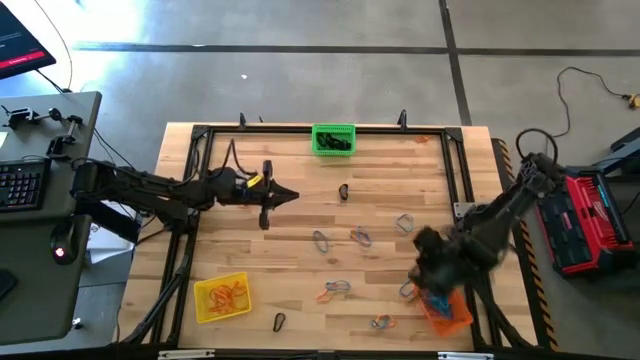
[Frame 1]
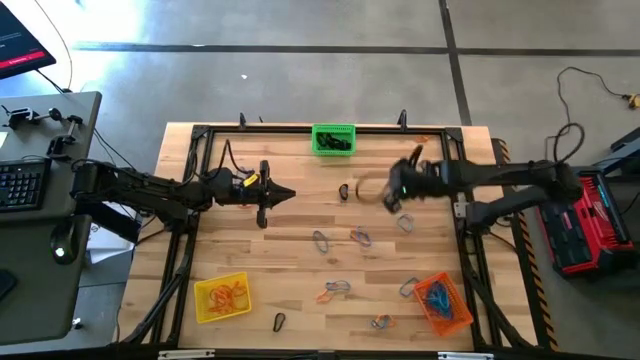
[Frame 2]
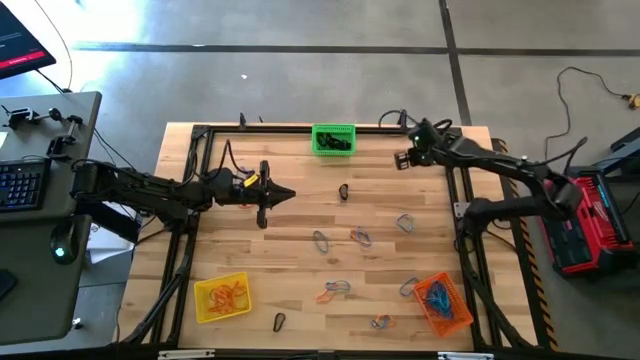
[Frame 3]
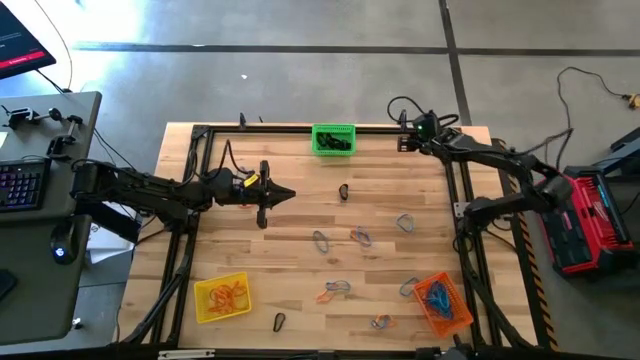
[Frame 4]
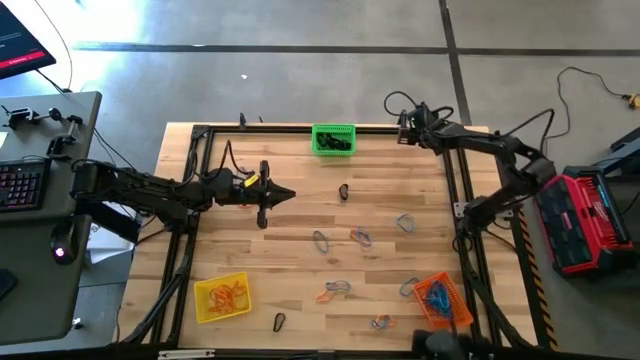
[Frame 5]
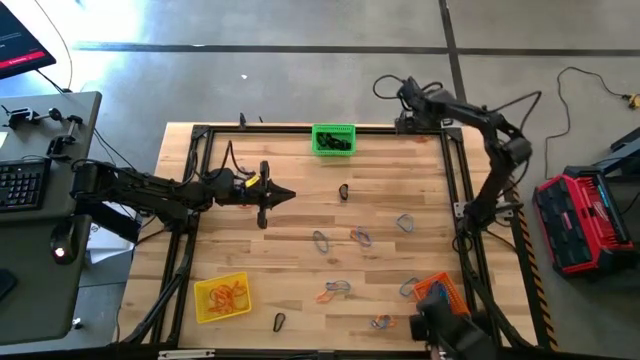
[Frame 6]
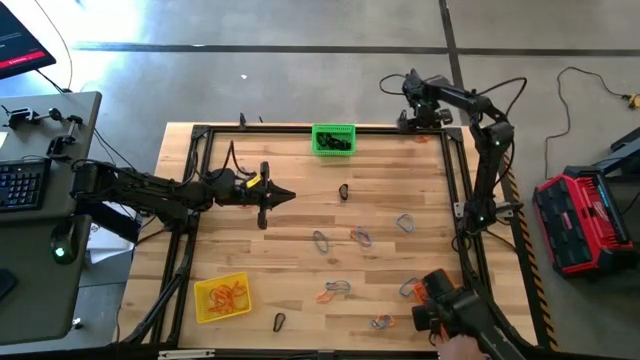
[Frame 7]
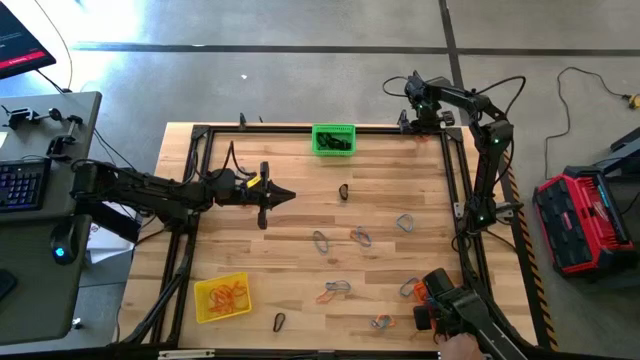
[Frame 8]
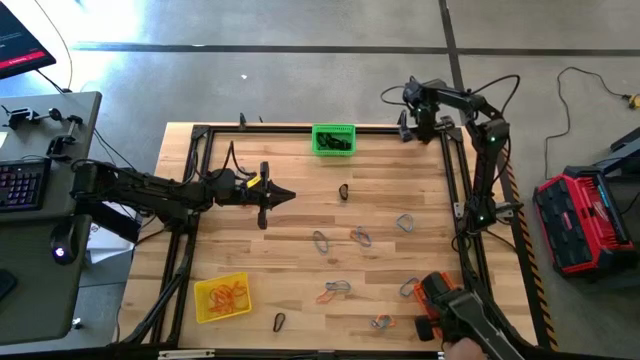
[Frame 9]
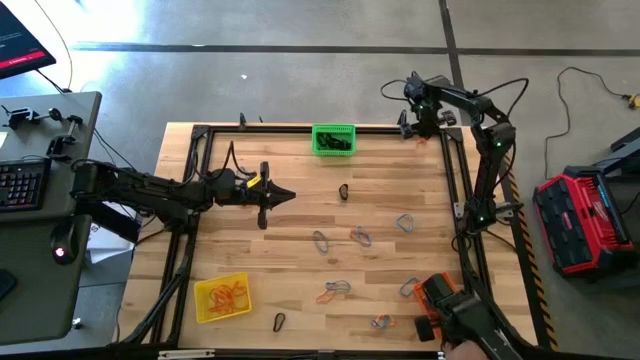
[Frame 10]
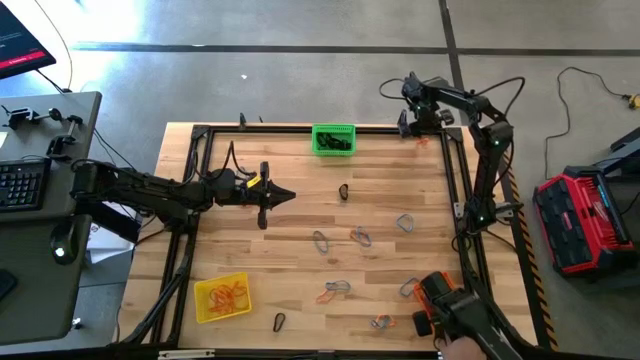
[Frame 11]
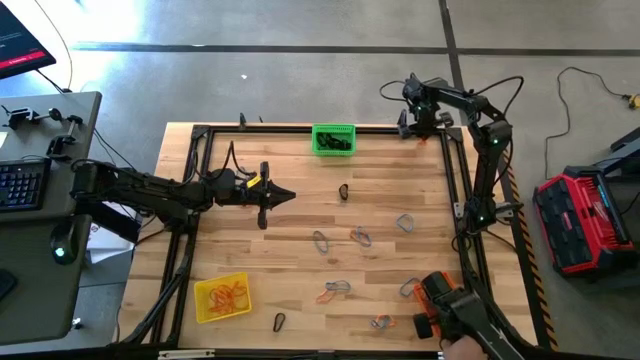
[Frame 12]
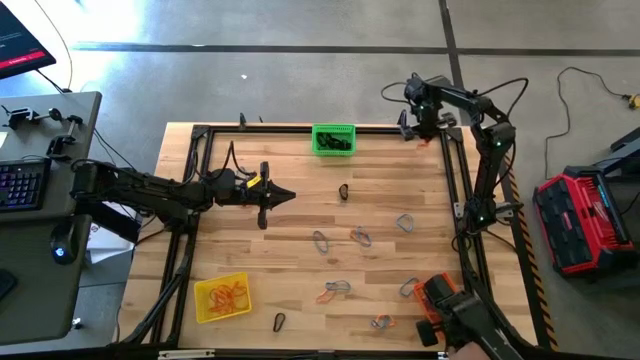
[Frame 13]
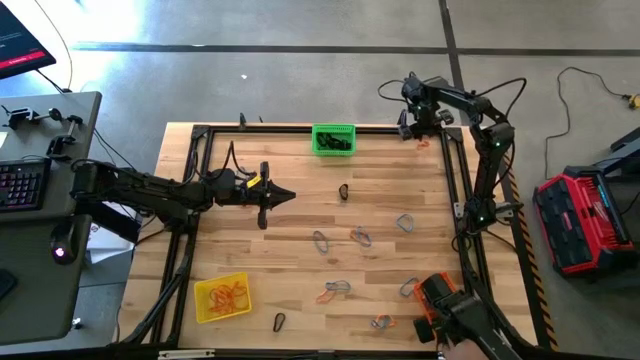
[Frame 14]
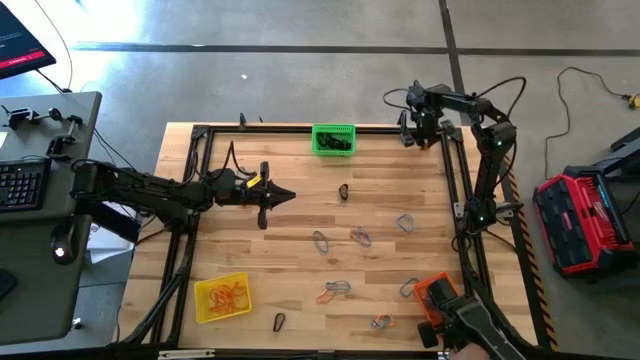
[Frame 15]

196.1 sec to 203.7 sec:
Task: Sort rubber bands into baskets
Put the orange rubber band into the yellow bin

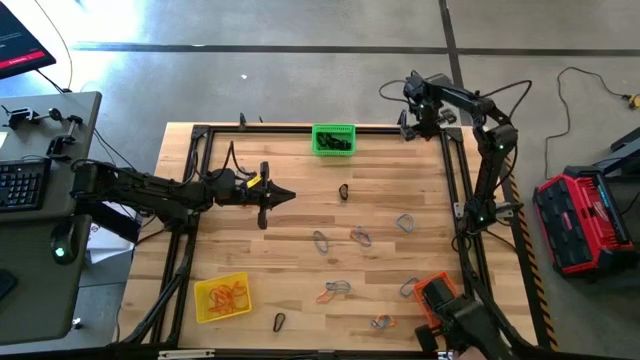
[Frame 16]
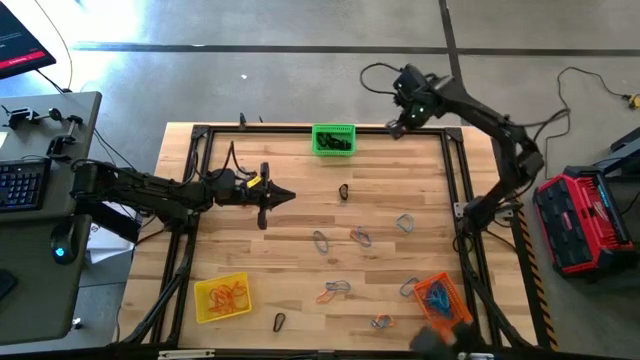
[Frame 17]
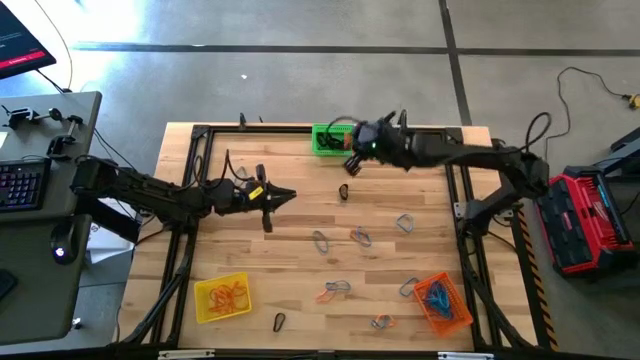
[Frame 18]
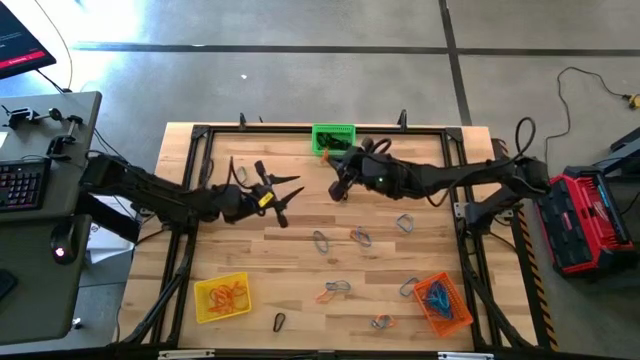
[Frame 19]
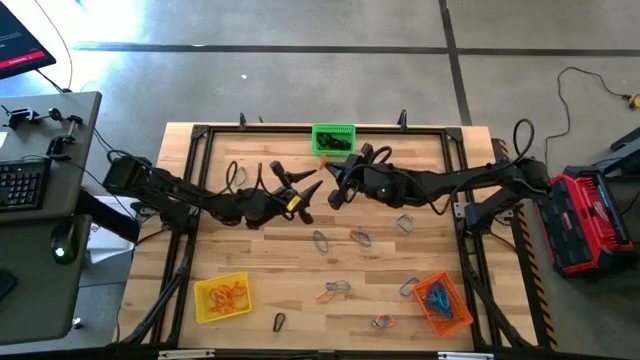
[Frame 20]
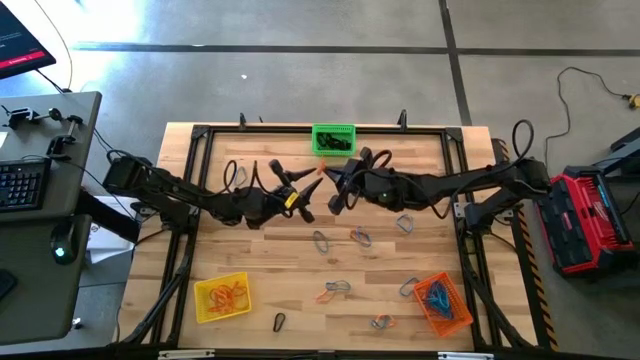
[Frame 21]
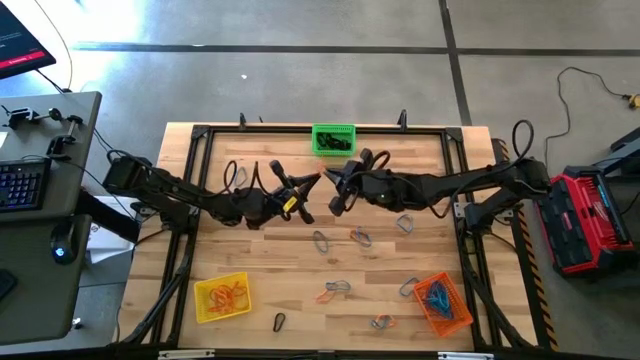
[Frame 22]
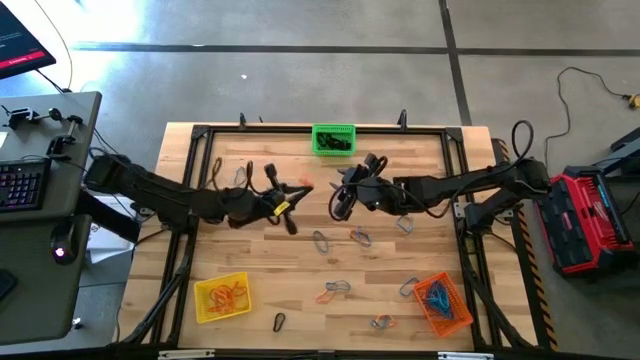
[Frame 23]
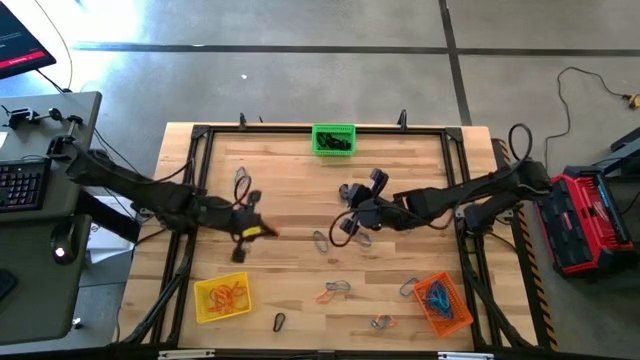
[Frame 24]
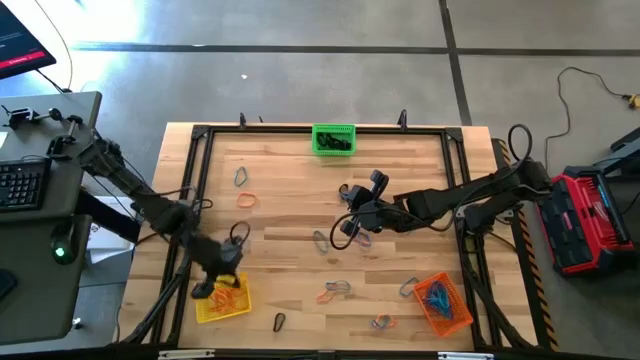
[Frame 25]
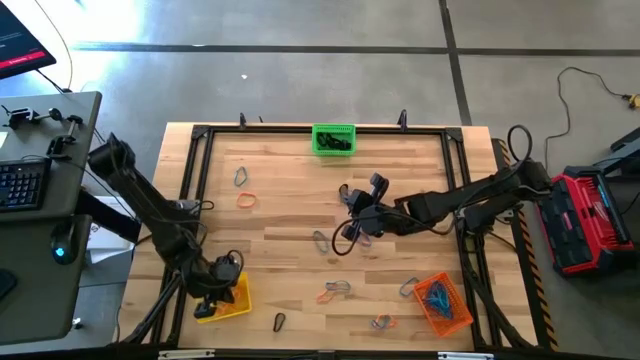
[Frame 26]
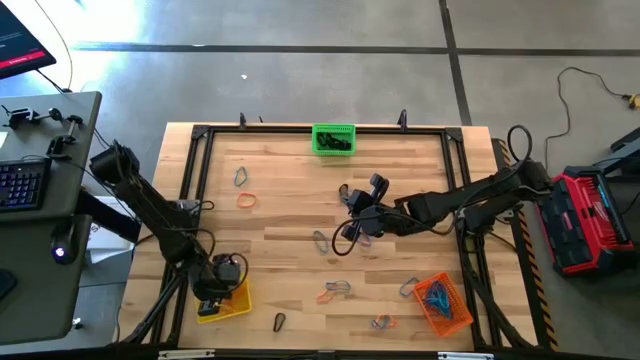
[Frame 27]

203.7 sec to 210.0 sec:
Put the orange rubber band into the yellow bin

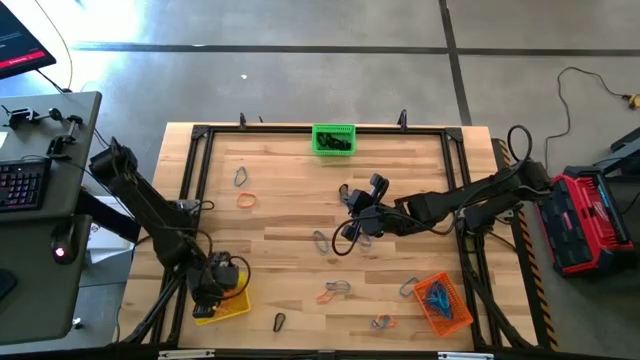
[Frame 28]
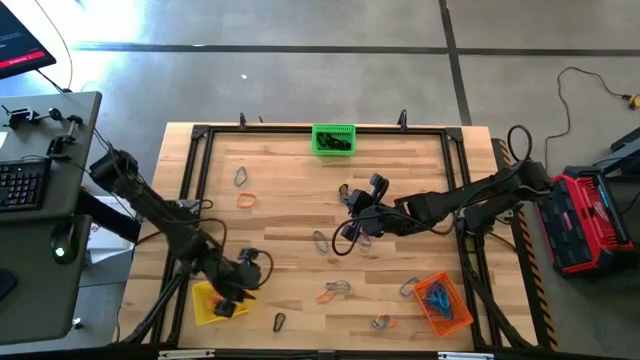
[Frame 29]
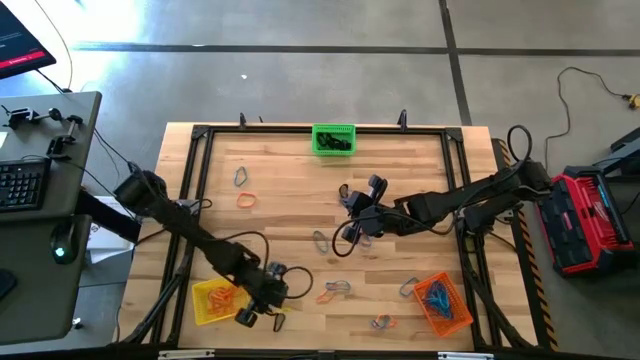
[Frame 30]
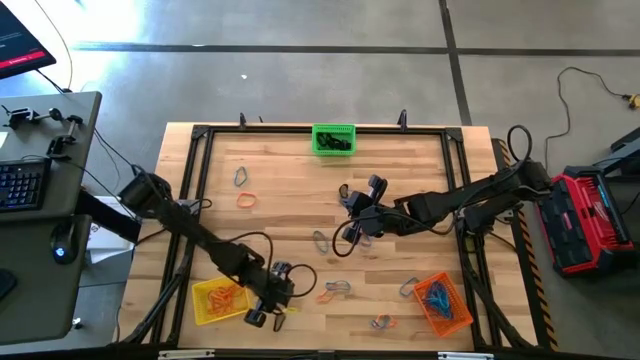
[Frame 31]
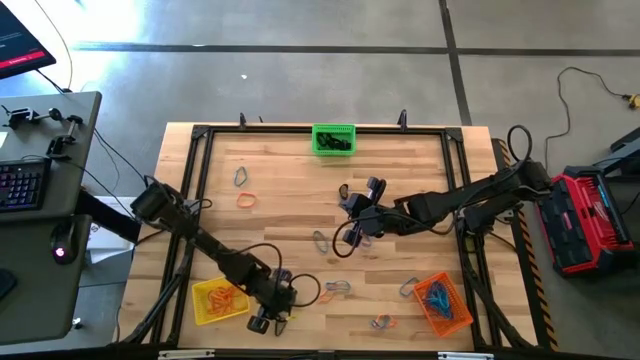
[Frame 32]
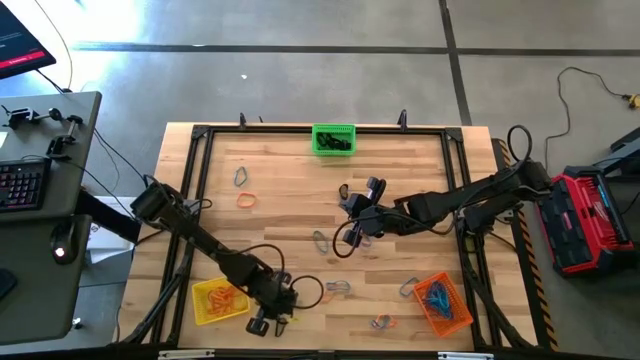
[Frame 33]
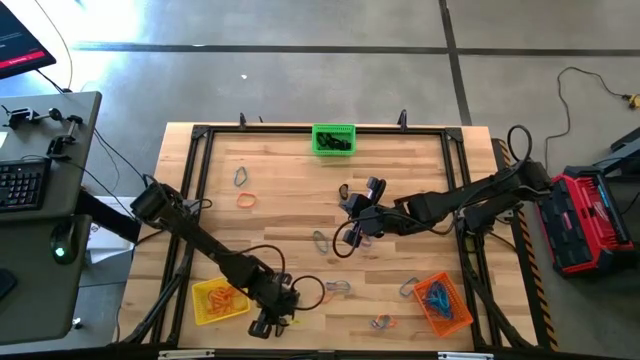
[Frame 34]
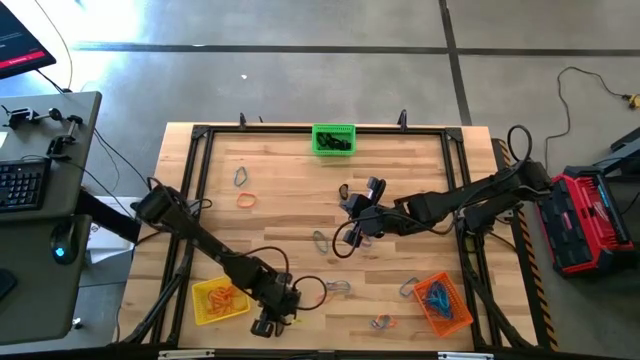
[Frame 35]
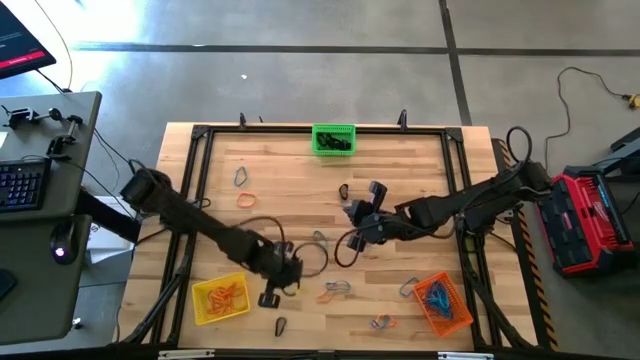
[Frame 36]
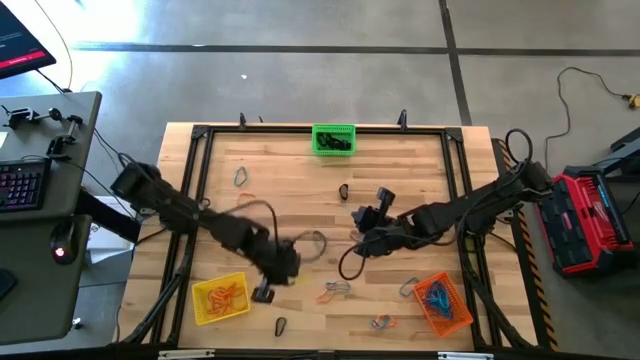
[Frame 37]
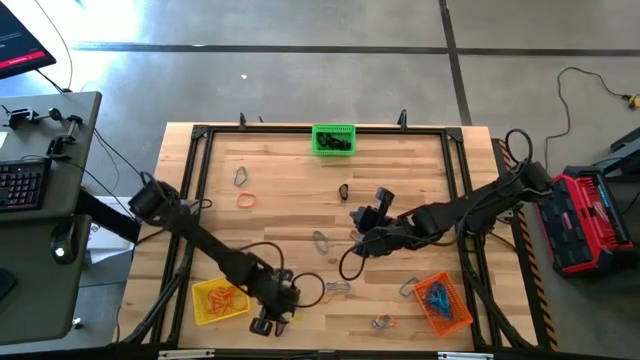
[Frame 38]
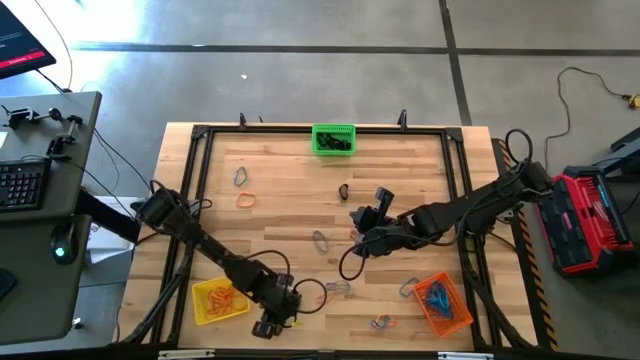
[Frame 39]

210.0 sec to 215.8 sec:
Put the black rubber band into the green bin

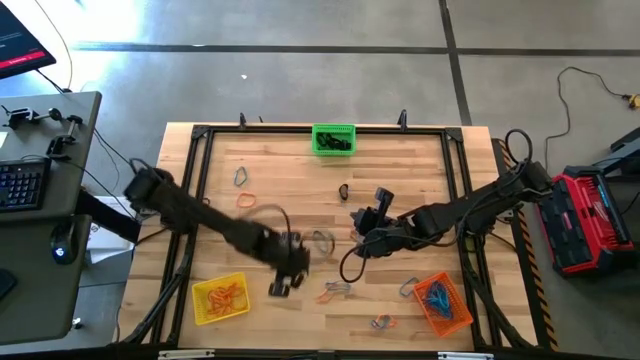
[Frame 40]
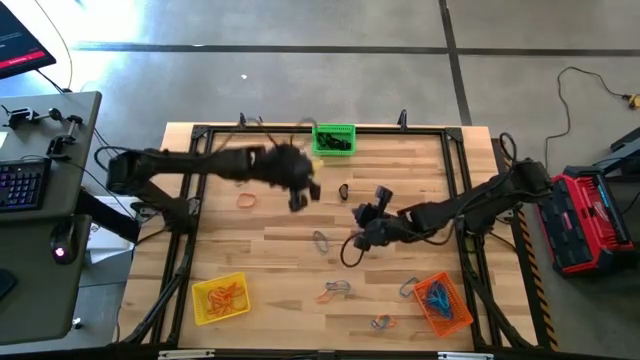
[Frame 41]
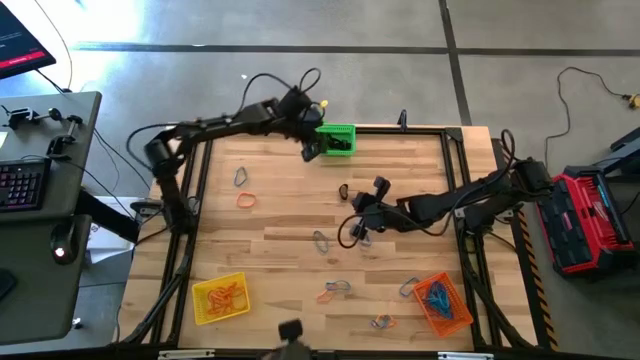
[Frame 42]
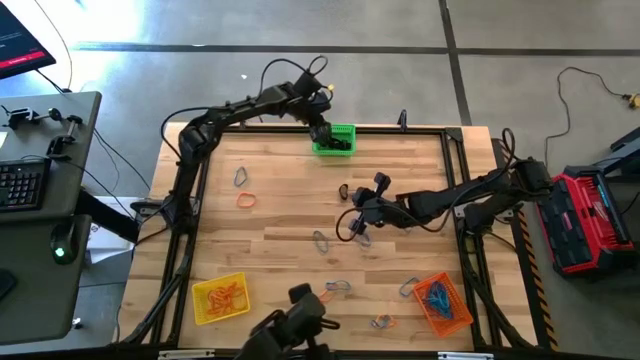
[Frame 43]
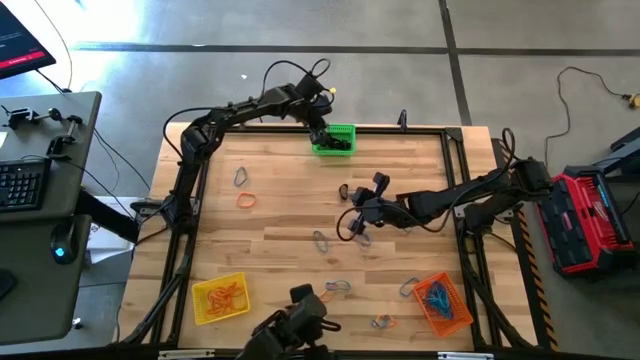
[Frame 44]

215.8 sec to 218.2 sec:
Put the black rubber band into the green bin
